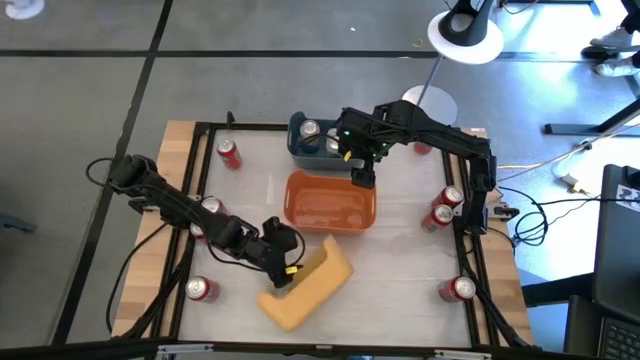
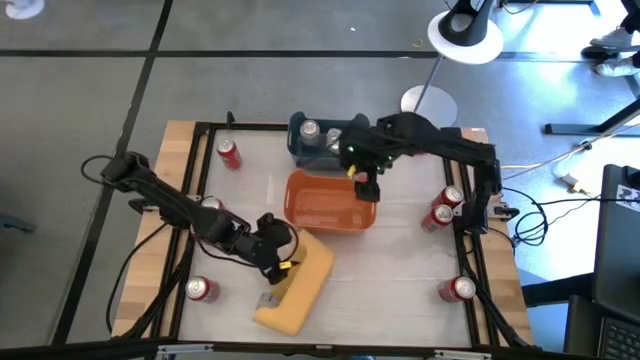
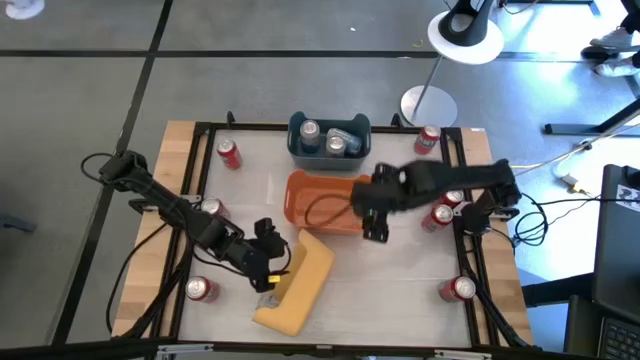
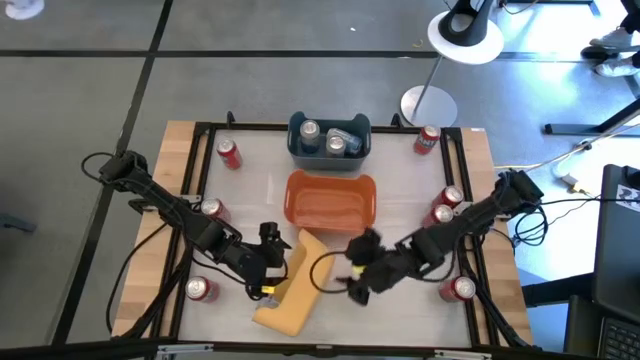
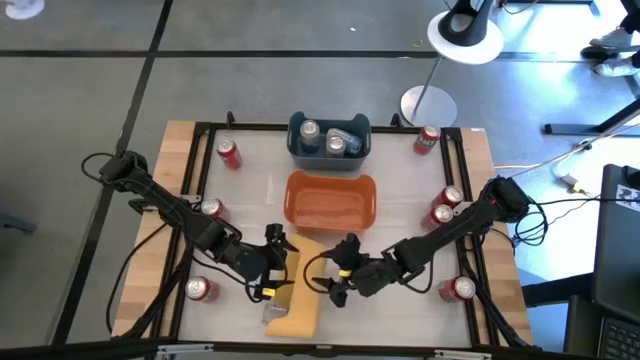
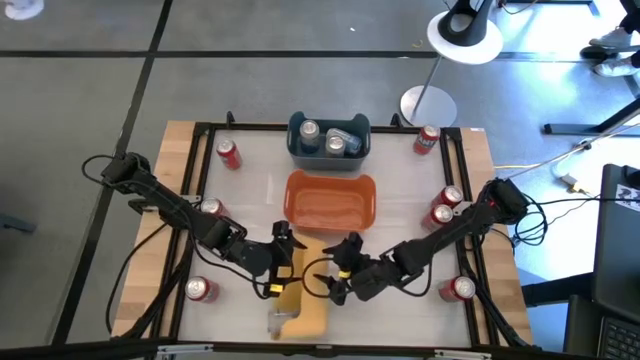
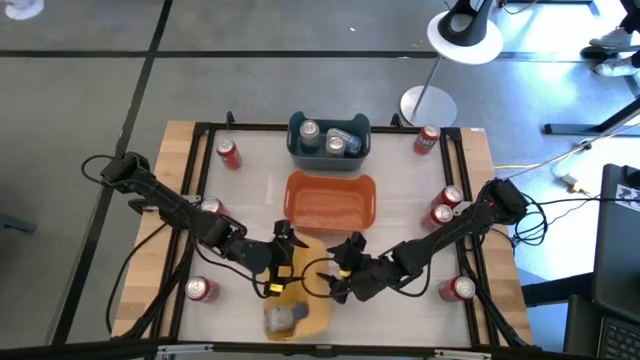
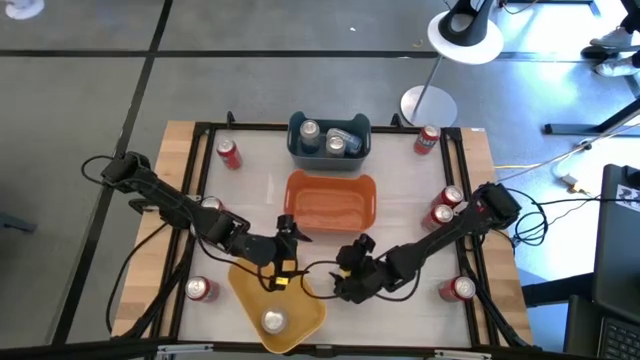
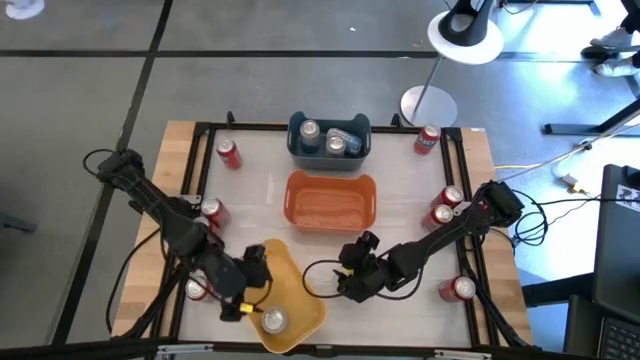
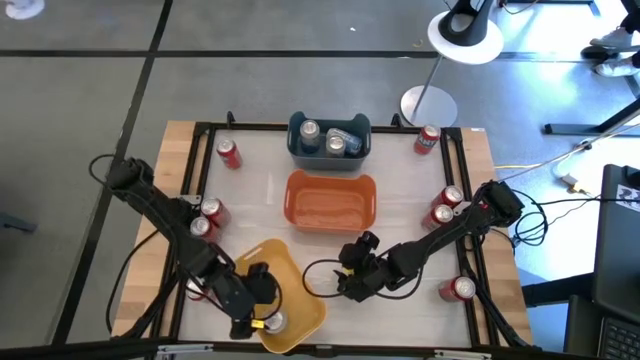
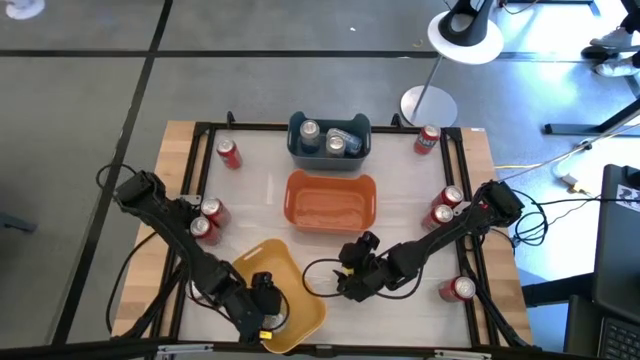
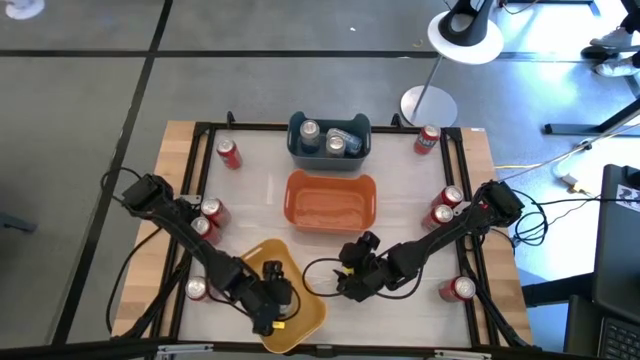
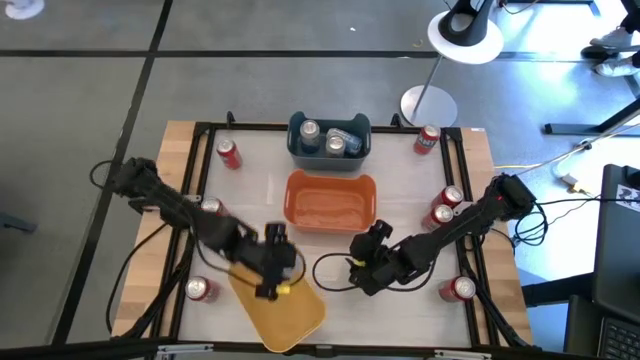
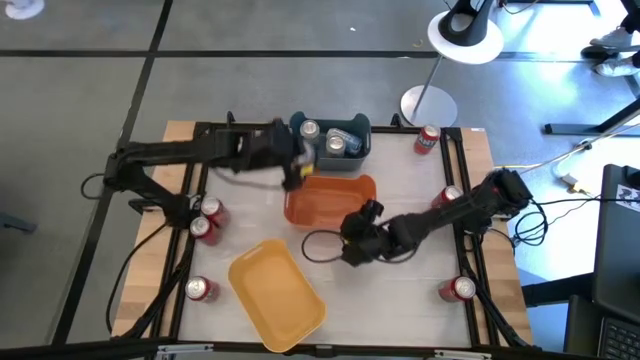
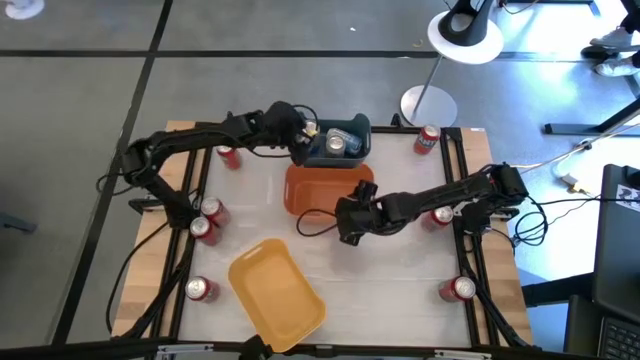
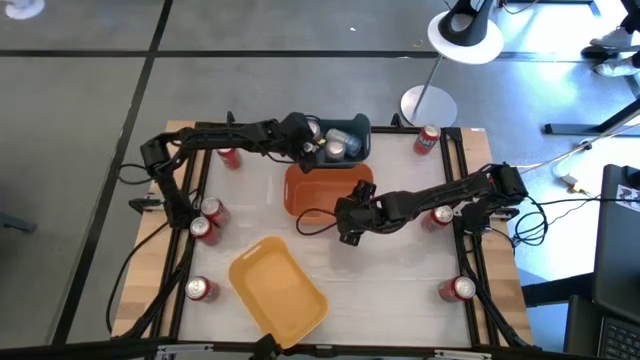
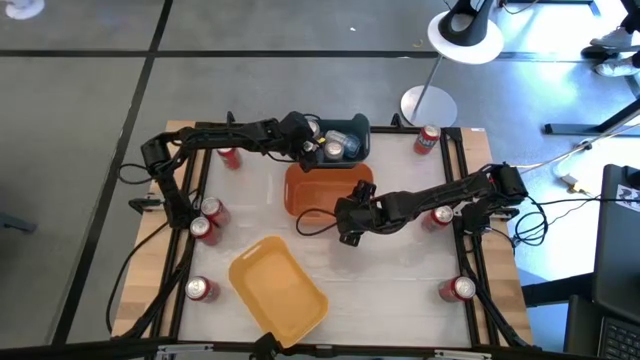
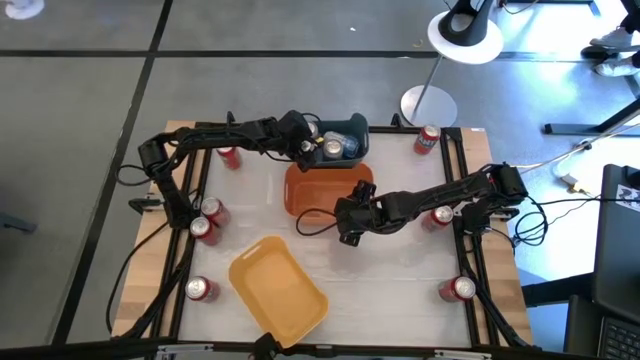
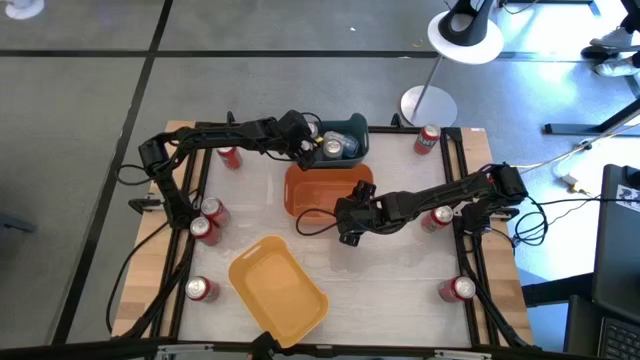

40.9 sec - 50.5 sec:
Task: Sort soda cans
Put the blue soda can from the yellow bin into the dark yellow bin

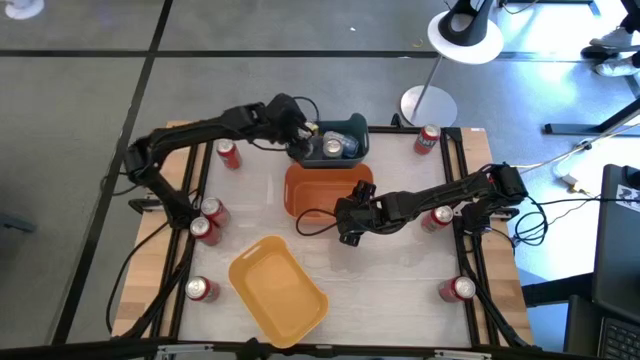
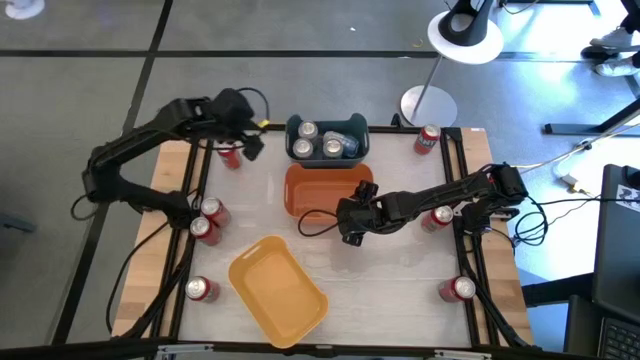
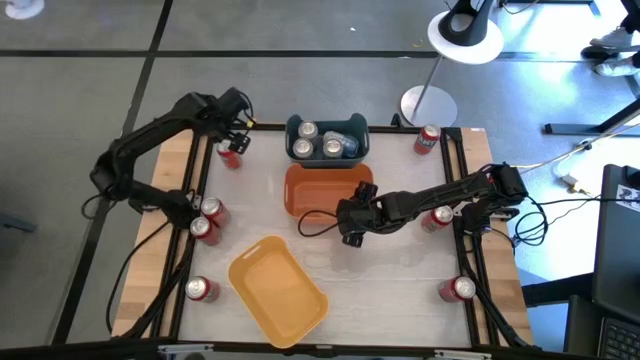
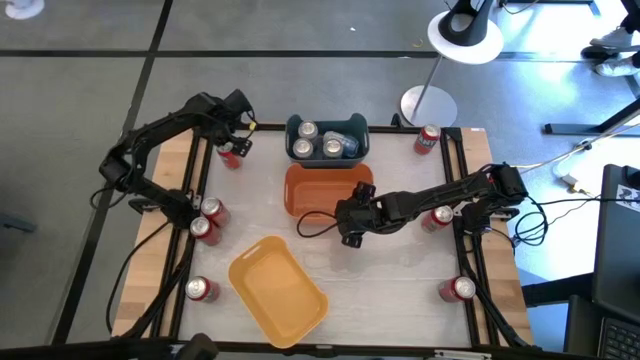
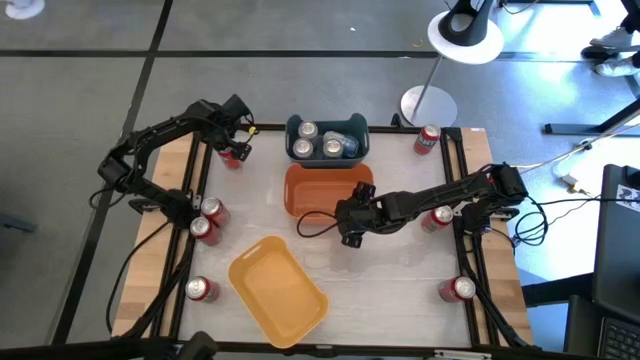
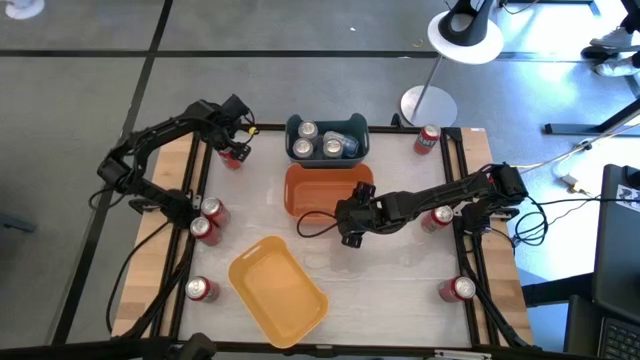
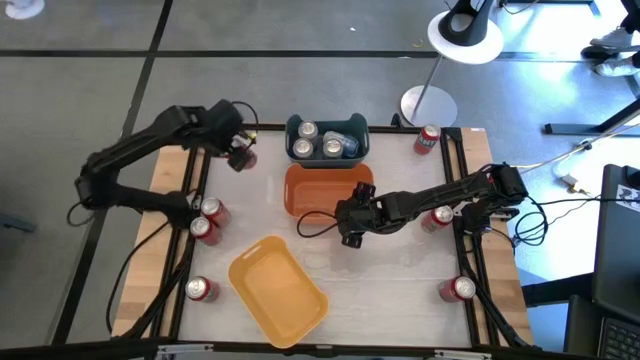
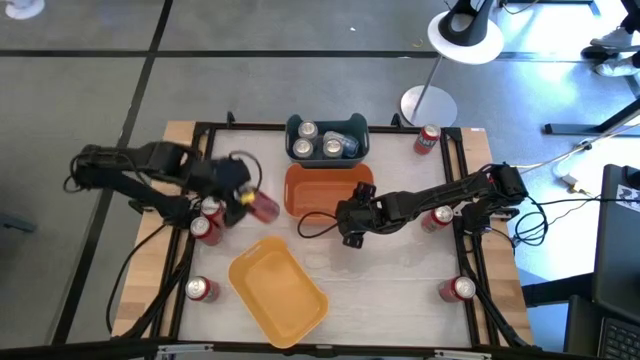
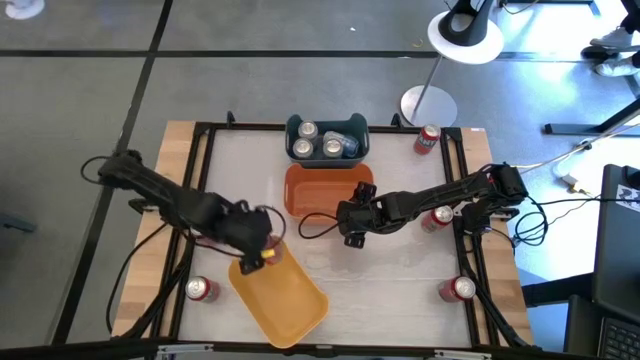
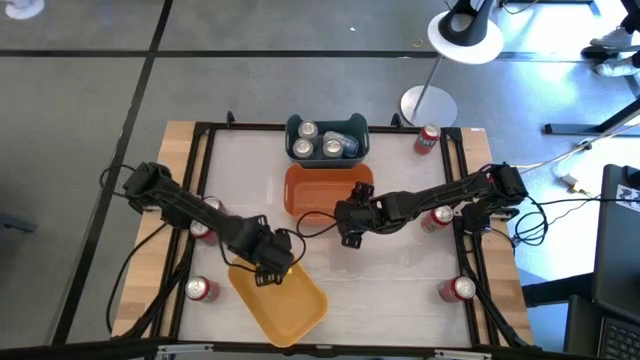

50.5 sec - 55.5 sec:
Put the top left orange soda can into the yellow bin

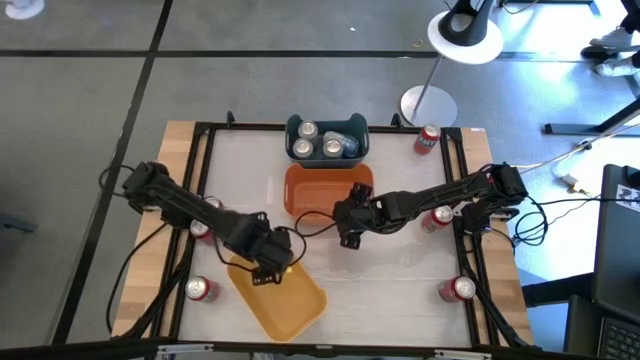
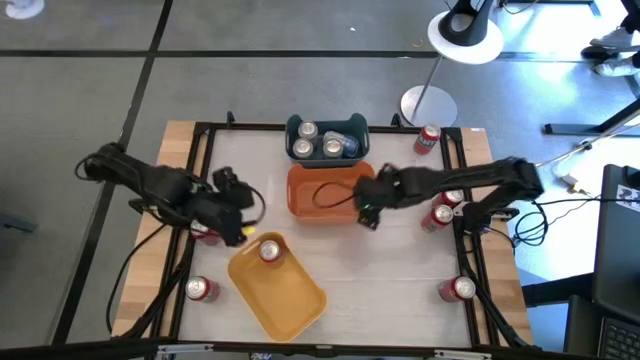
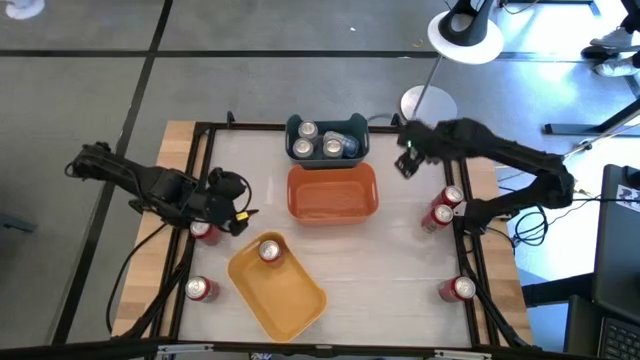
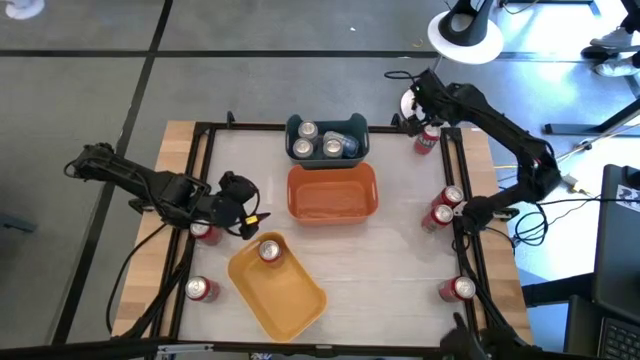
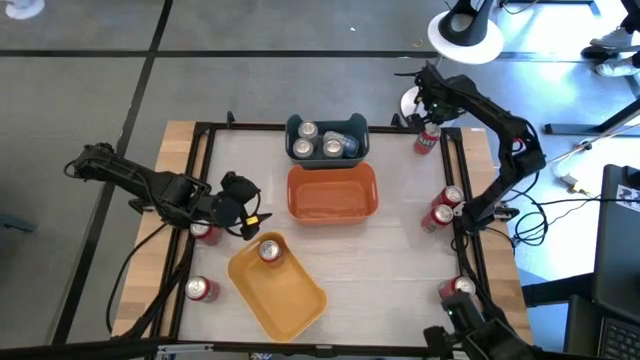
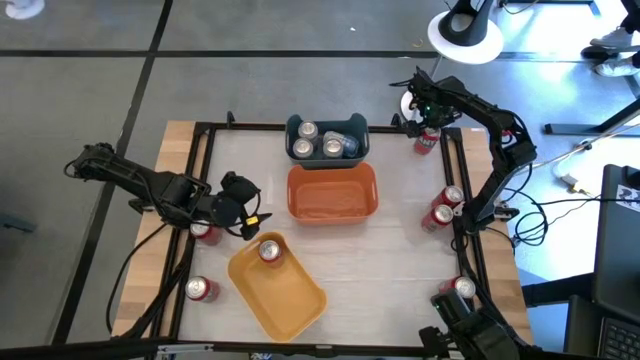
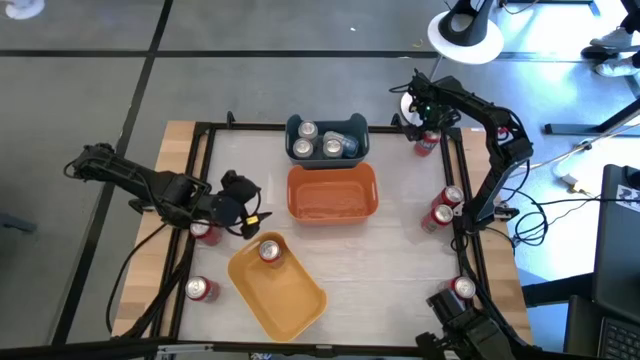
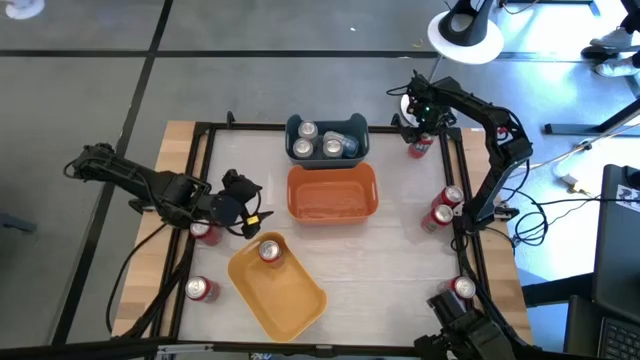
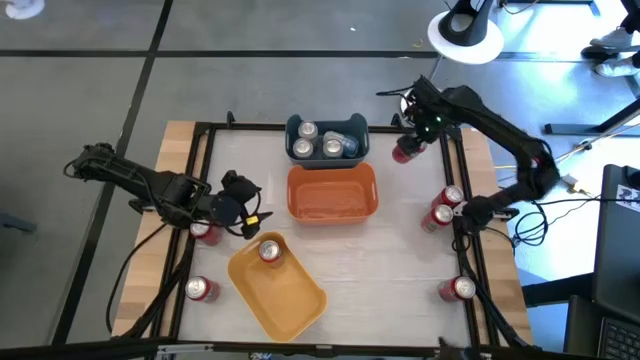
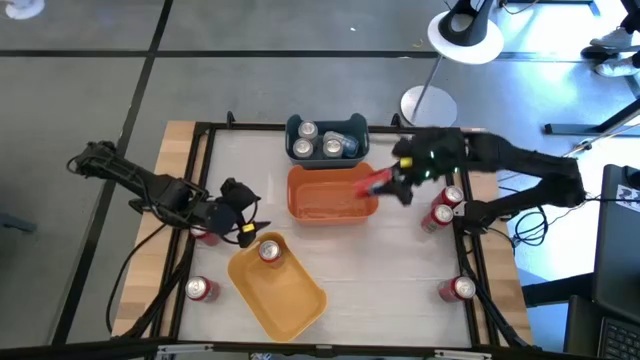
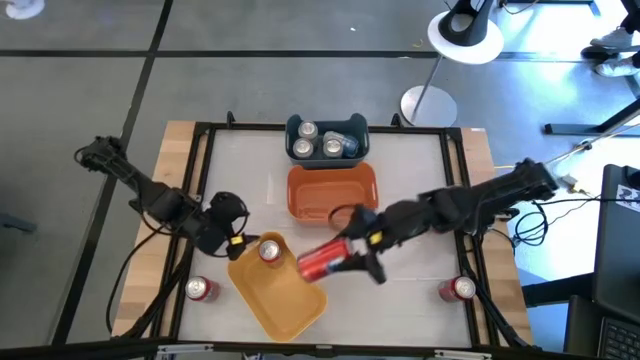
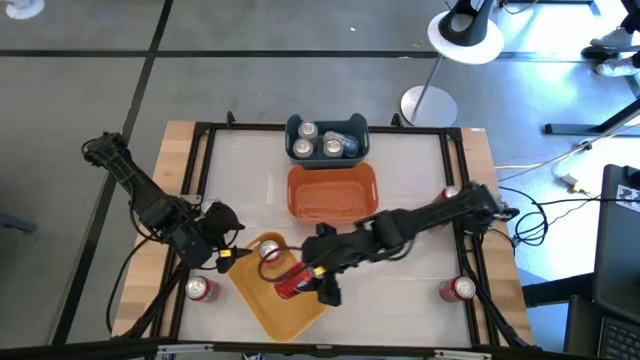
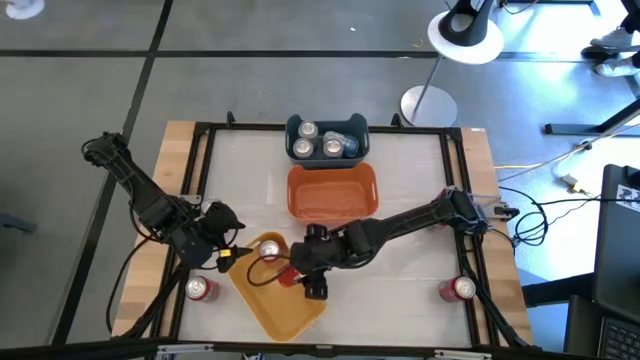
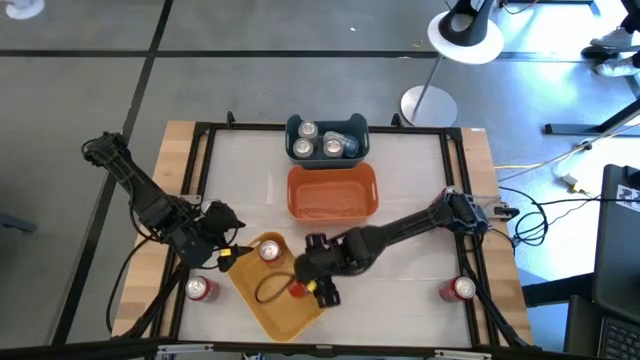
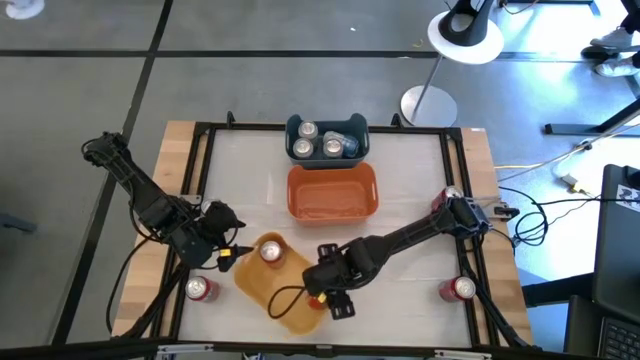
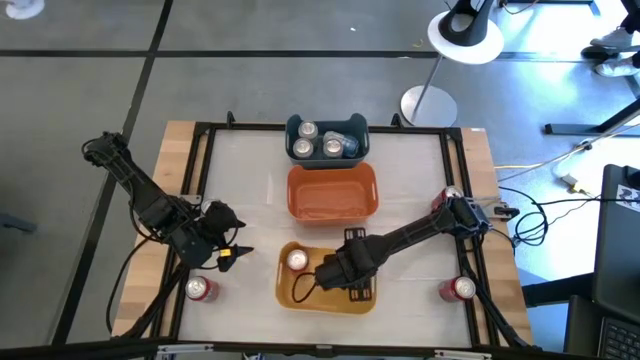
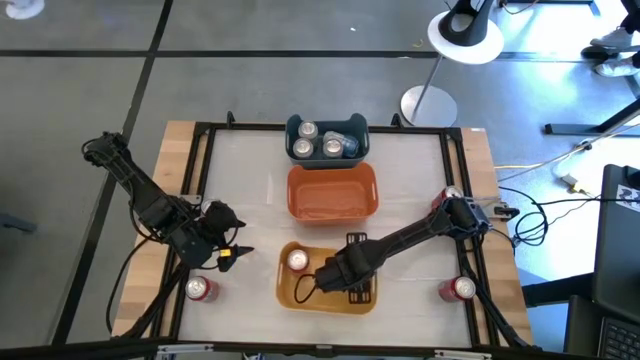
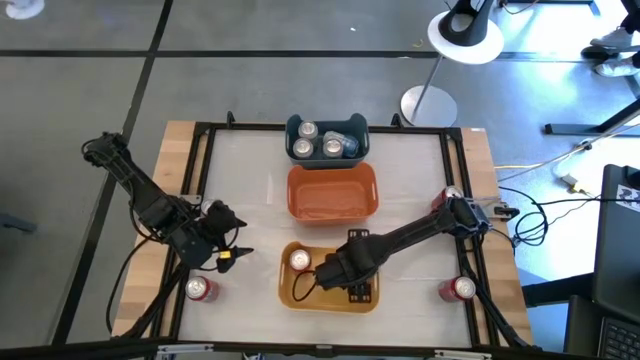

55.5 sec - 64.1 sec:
Put the top orange soda can into the yellow bin
